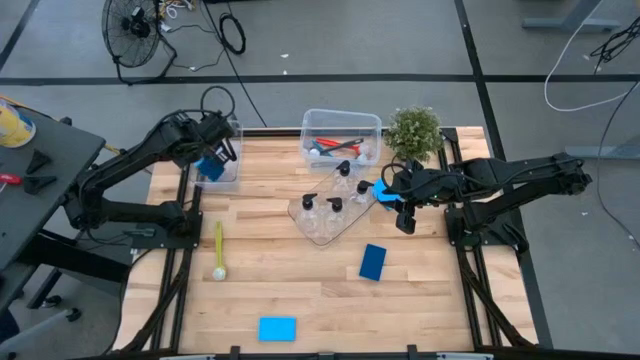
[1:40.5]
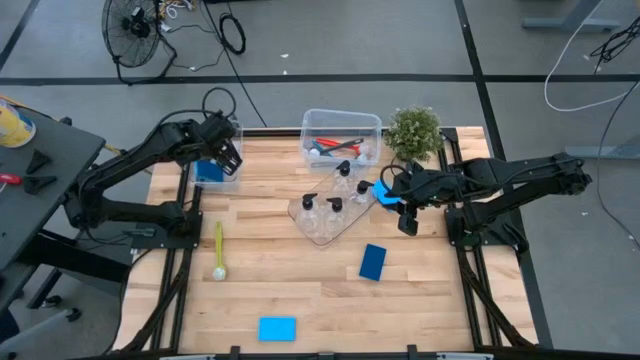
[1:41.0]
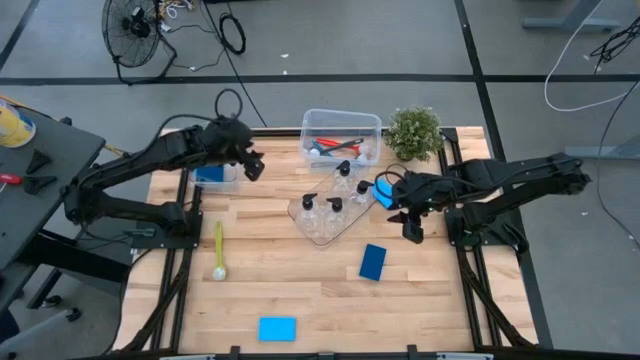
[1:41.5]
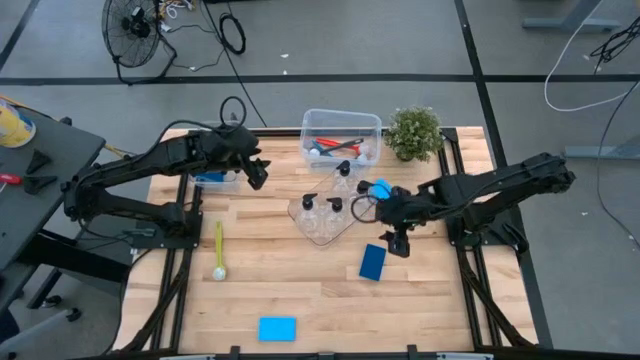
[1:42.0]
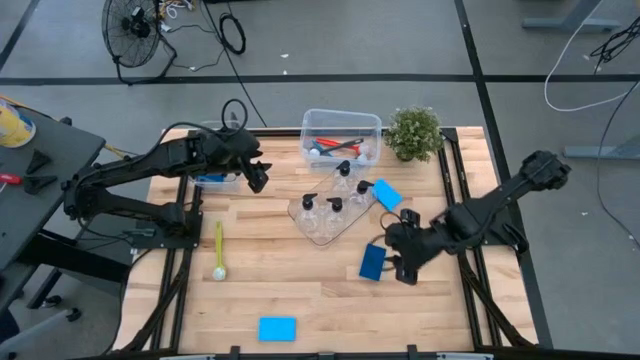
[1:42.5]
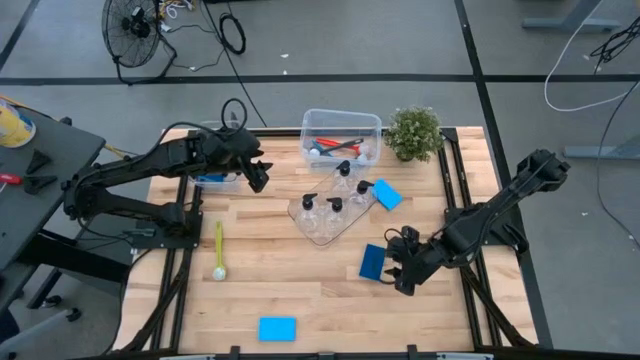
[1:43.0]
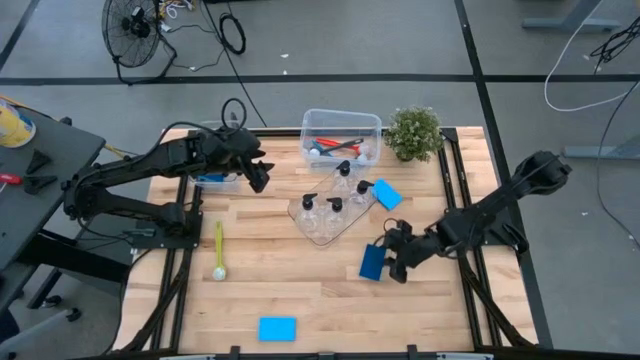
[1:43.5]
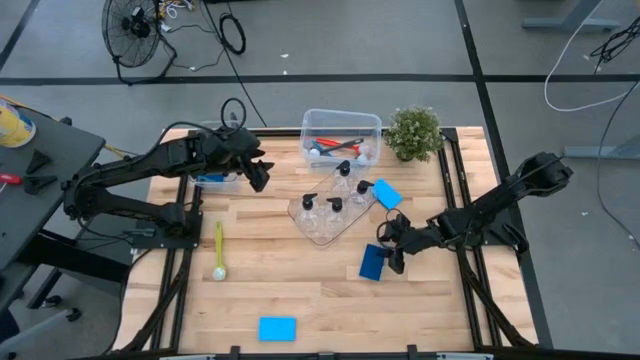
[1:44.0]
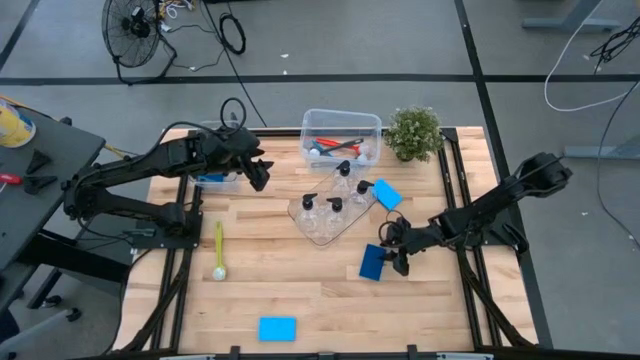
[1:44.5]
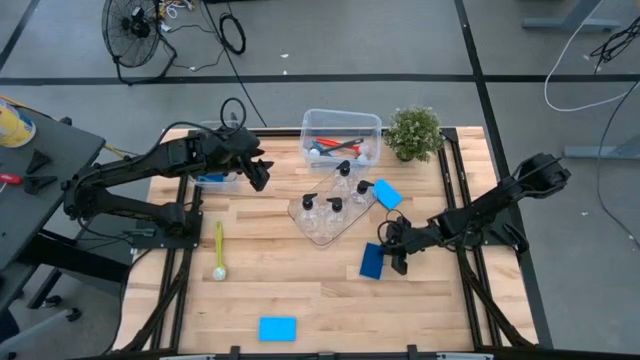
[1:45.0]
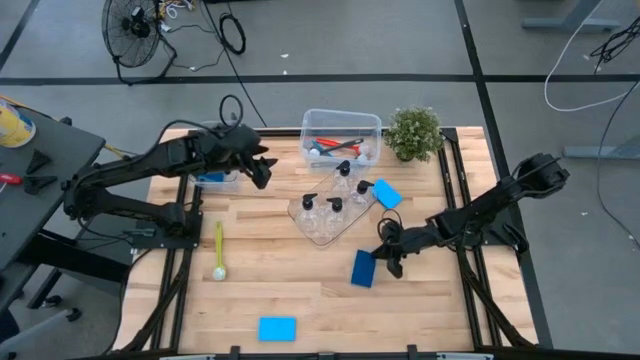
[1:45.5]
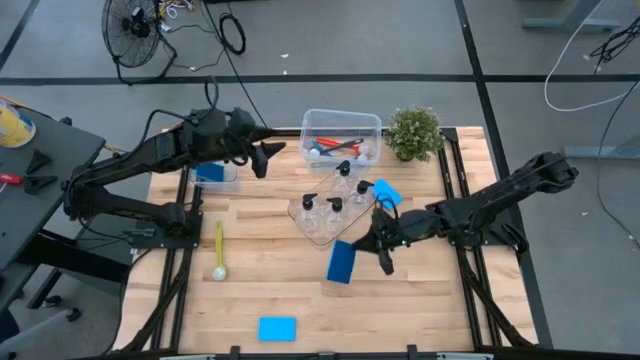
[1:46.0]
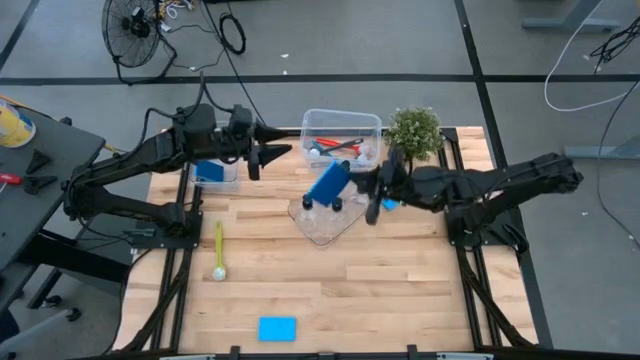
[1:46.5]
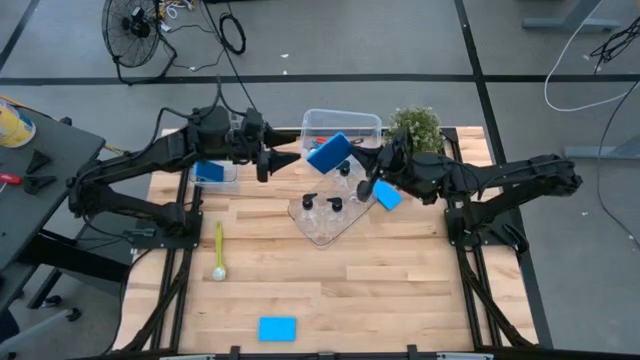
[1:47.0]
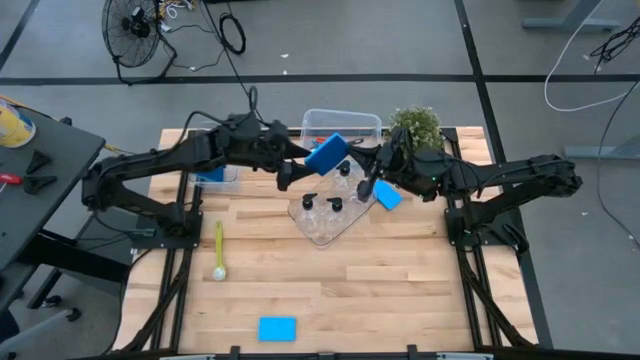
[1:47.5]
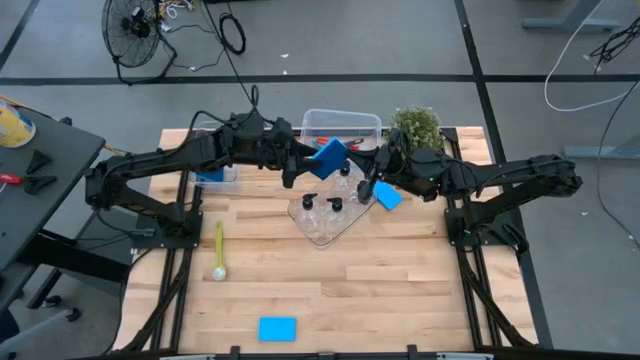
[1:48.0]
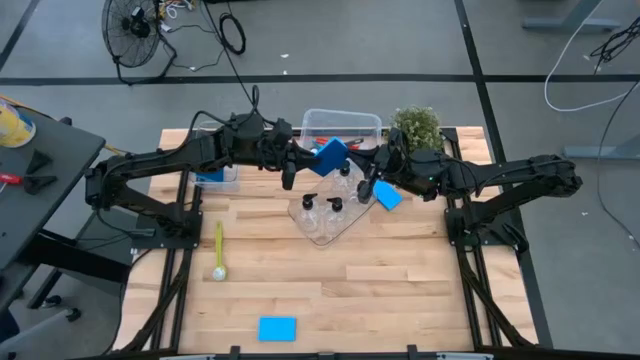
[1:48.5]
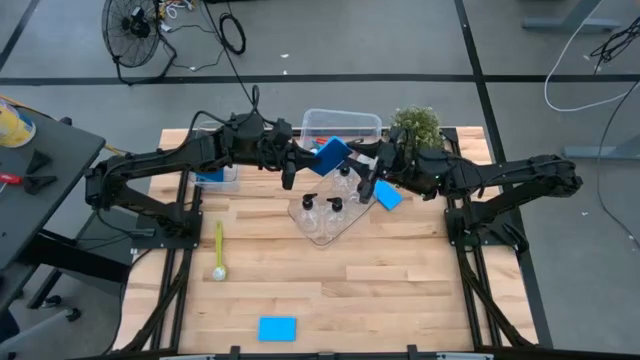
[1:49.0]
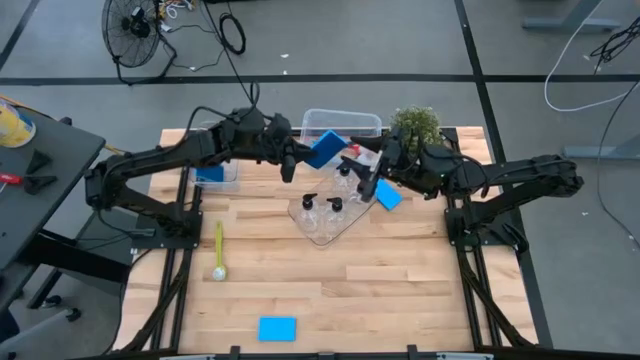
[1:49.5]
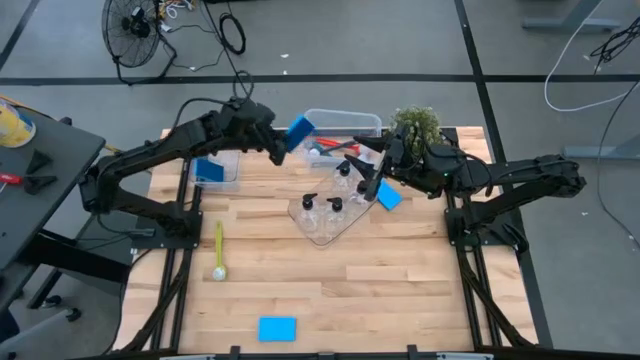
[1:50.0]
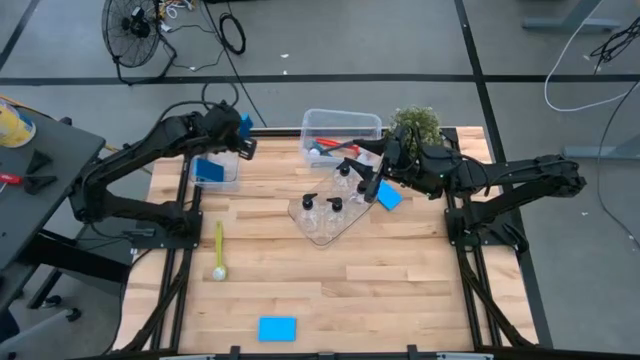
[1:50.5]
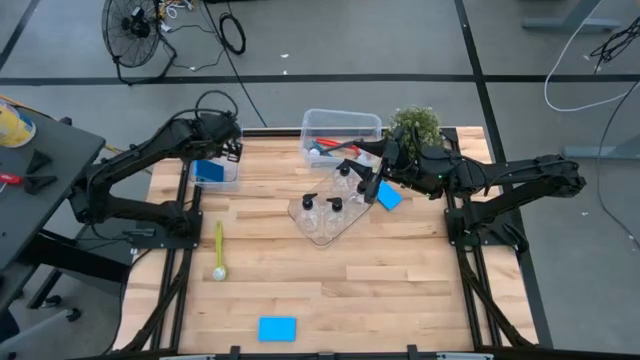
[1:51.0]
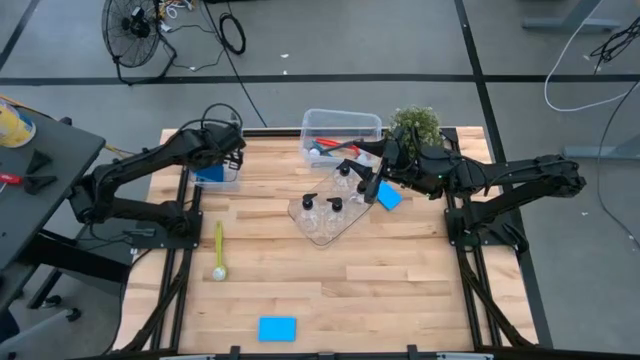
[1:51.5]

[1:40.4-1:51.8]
Task: Pick & Place Kitchen Sink Supplies
Put the blue sponge wipe into the left transparent bin

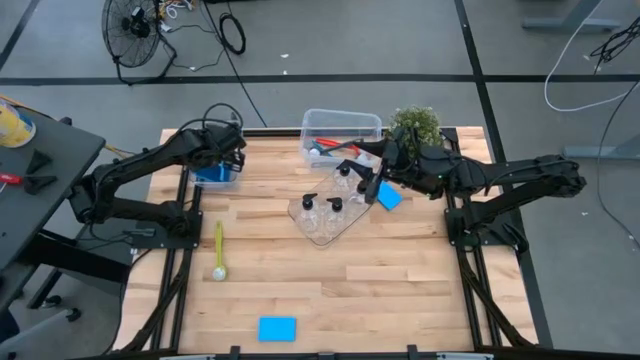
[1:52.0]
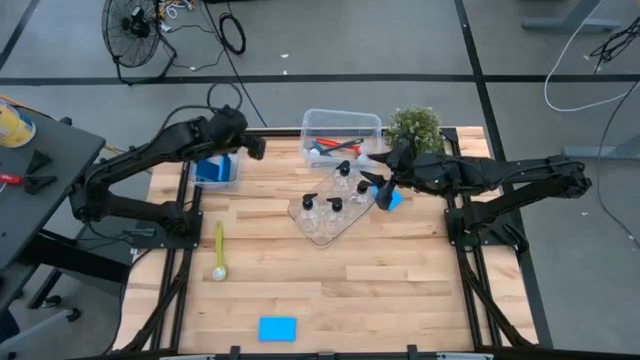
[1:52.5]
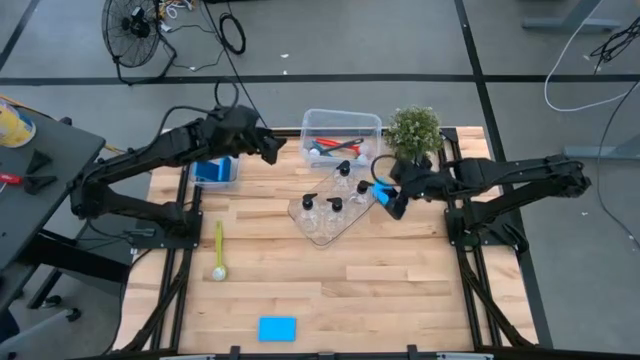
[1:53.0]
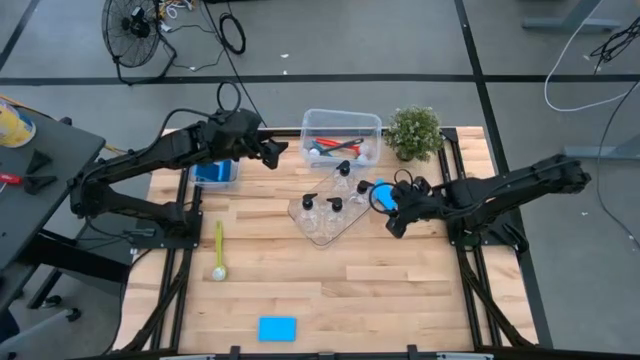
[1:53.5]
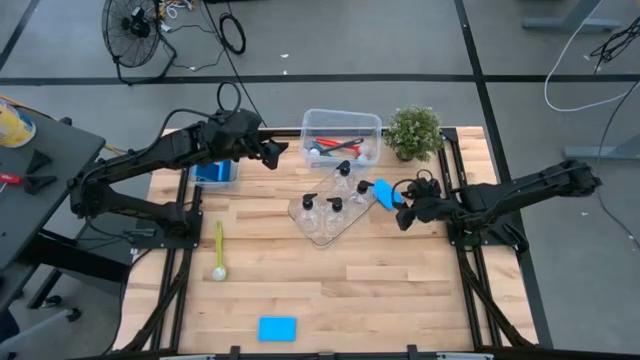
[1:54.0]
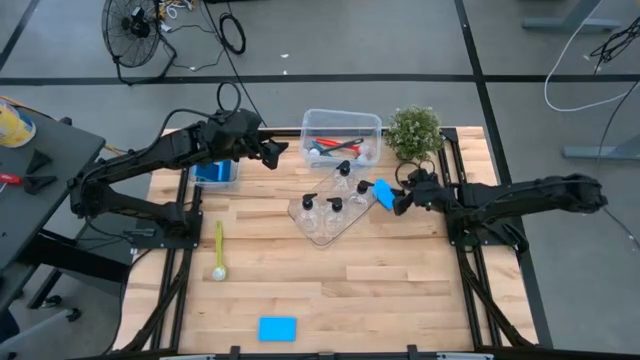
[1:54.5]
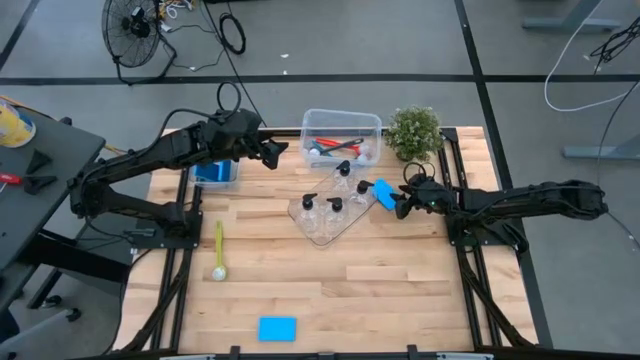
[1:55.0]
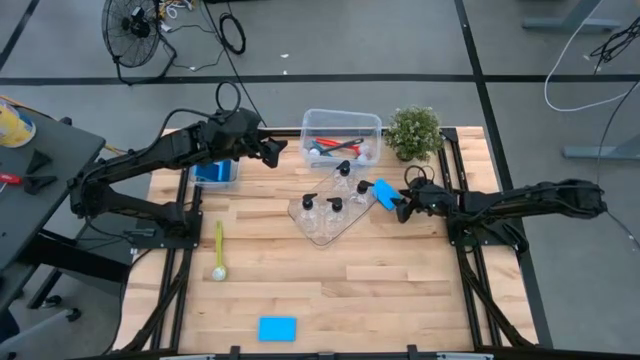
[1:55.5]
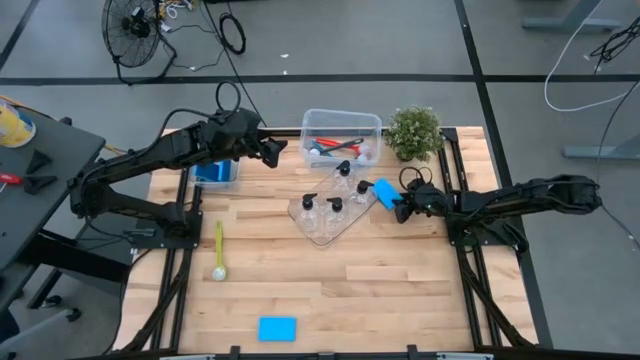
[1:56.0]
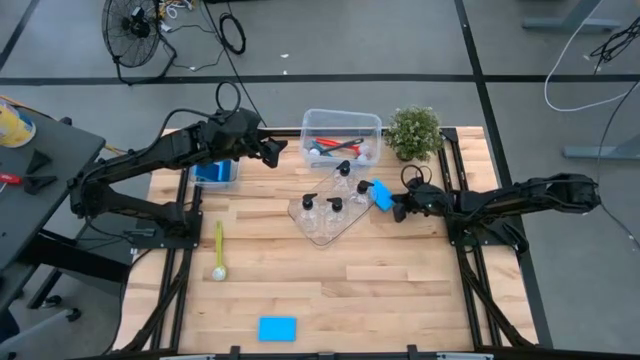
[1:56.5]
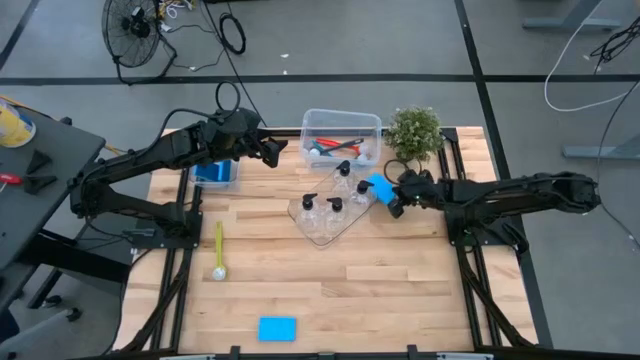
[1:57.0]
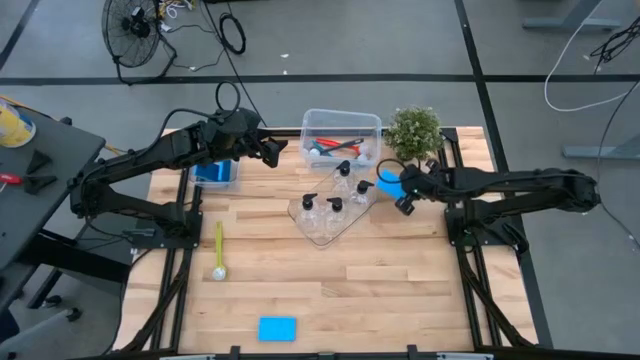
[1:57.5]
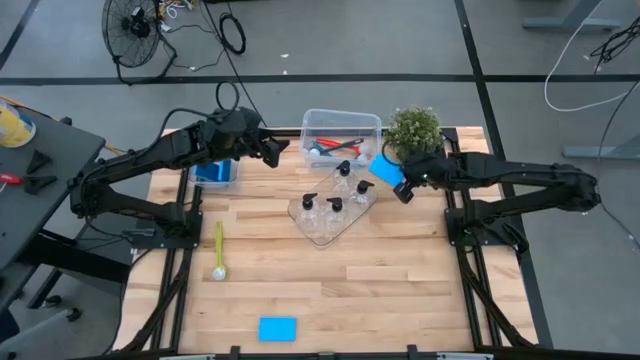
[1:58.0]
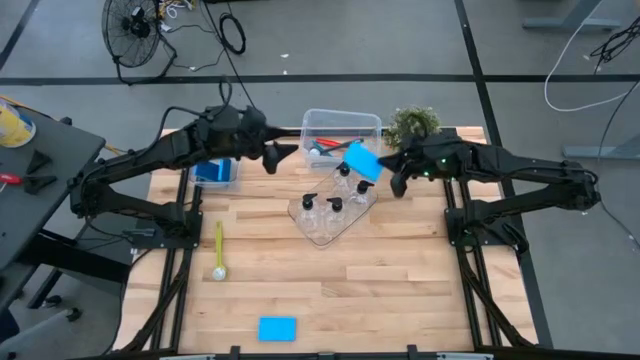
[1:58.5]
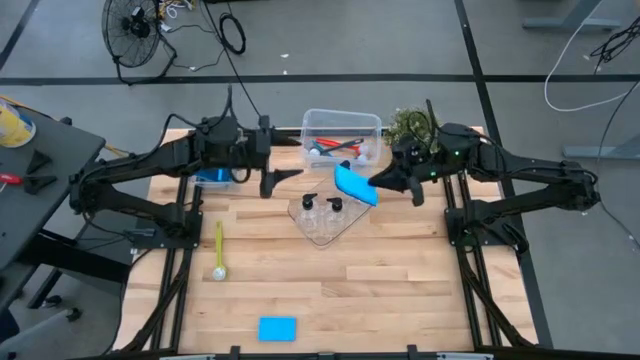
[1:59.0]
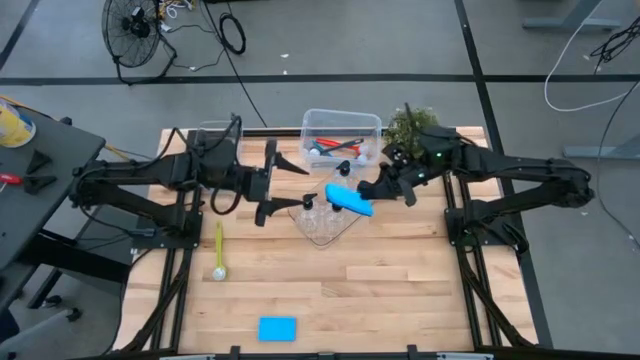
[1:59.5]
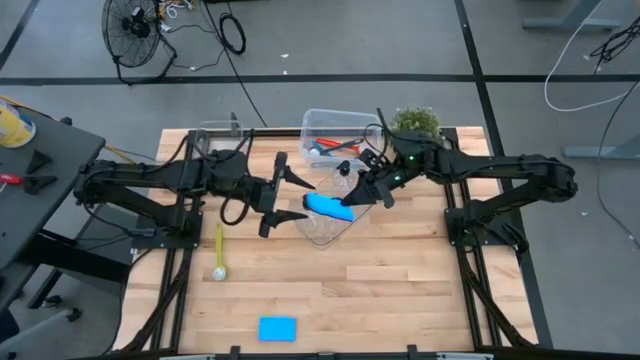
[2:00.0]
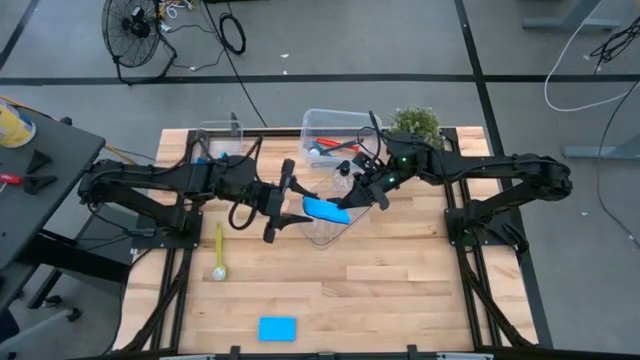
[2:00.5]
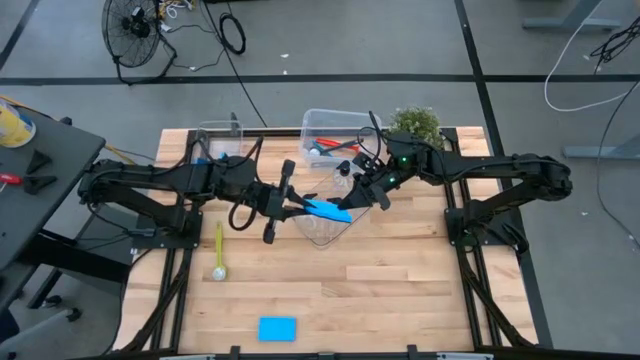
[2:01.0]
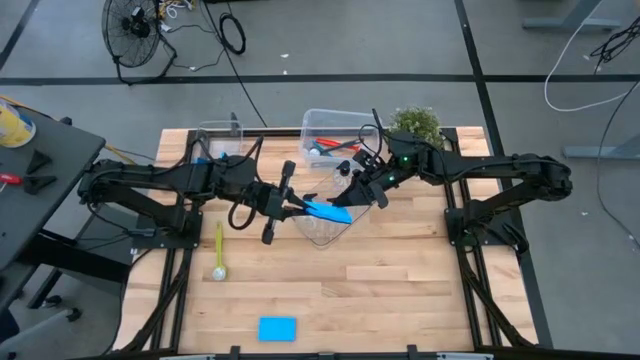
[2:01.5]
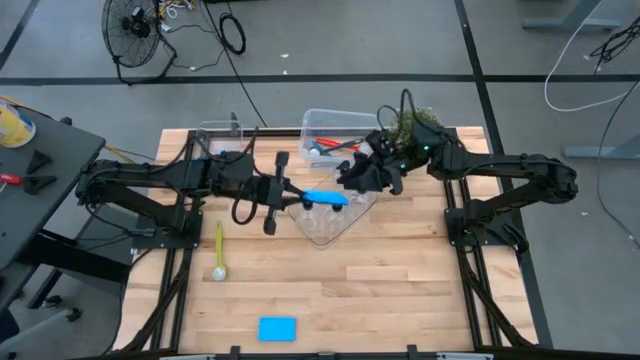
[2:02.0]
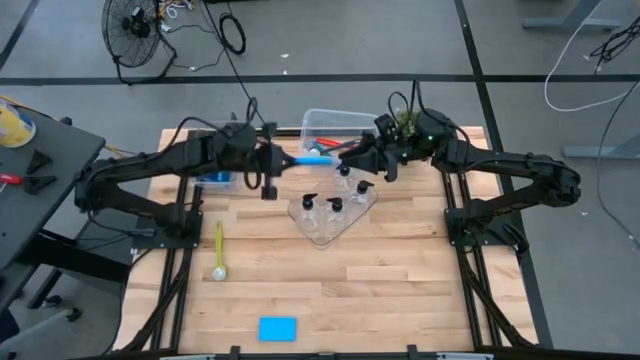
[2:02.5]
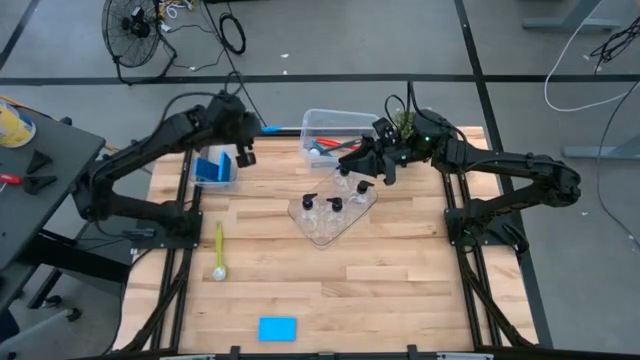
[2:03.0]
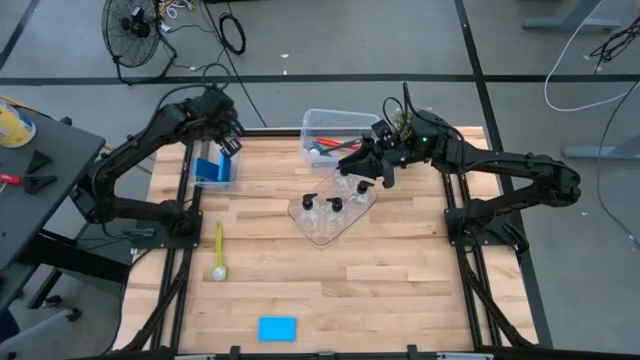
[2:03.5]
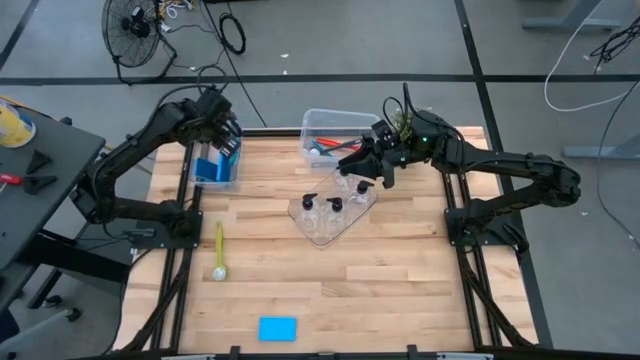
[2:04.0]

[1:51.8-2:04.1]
Put the blue sponge wipe into the left transparent bin
